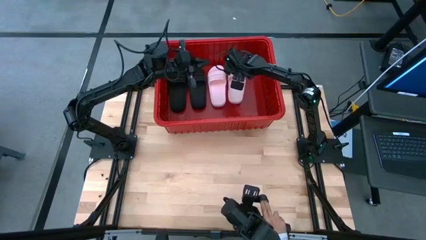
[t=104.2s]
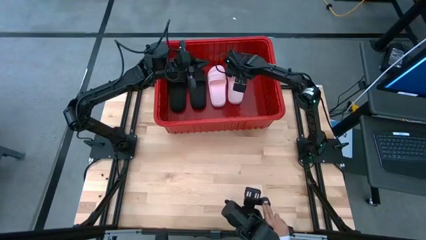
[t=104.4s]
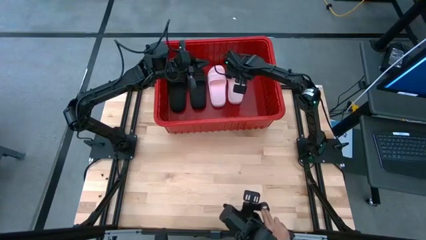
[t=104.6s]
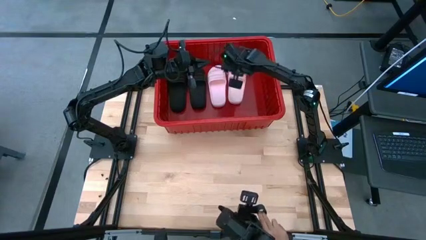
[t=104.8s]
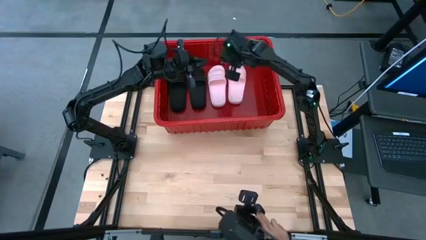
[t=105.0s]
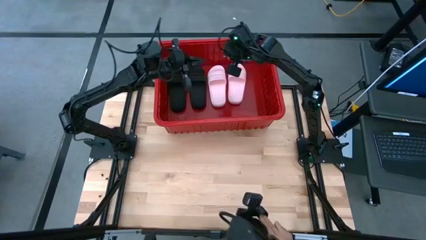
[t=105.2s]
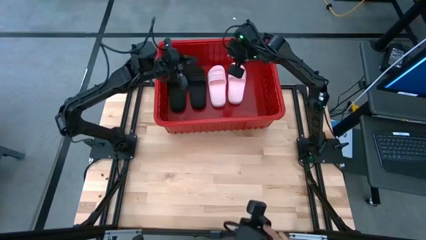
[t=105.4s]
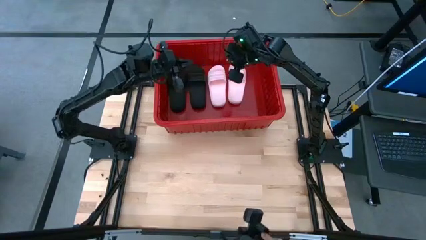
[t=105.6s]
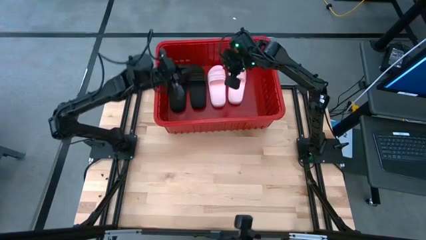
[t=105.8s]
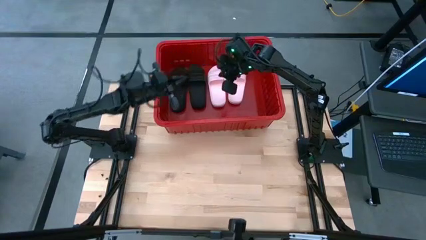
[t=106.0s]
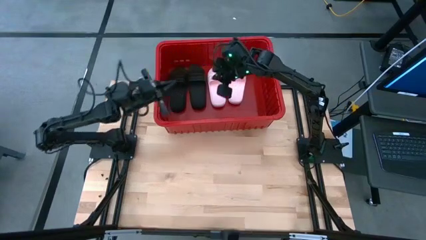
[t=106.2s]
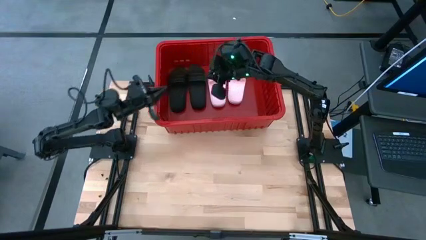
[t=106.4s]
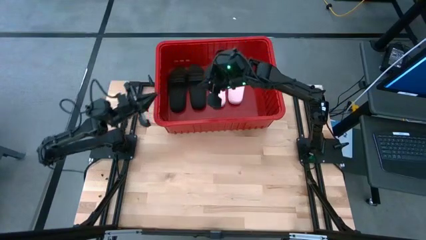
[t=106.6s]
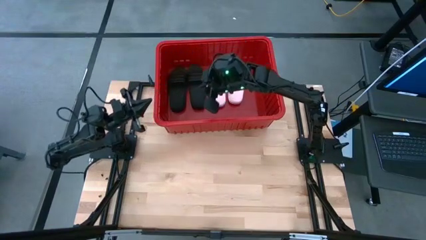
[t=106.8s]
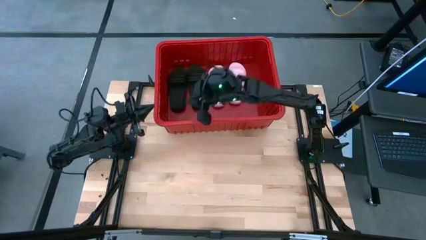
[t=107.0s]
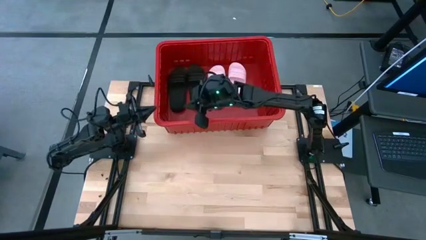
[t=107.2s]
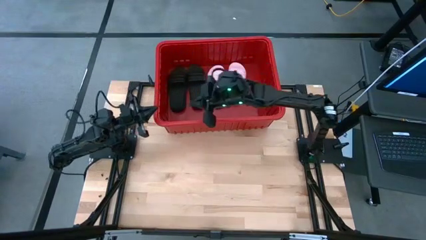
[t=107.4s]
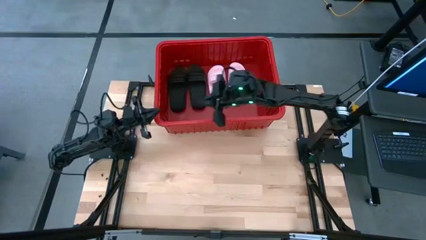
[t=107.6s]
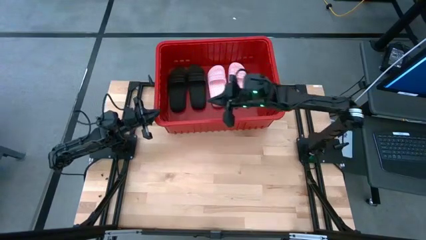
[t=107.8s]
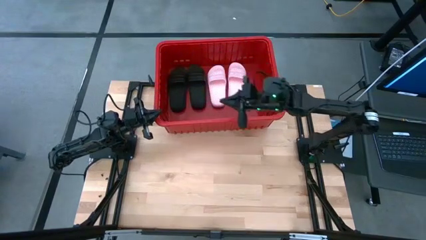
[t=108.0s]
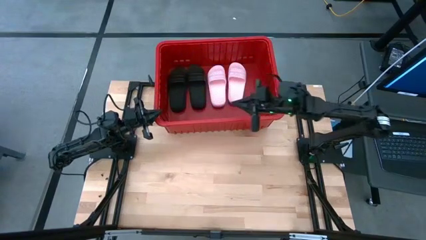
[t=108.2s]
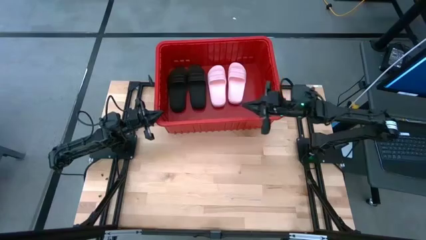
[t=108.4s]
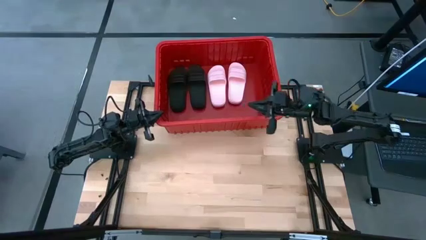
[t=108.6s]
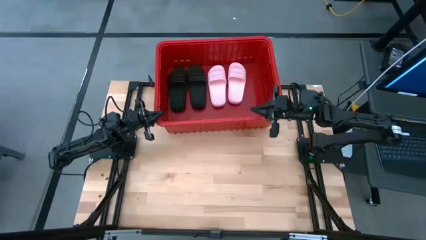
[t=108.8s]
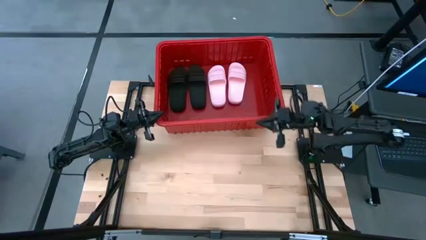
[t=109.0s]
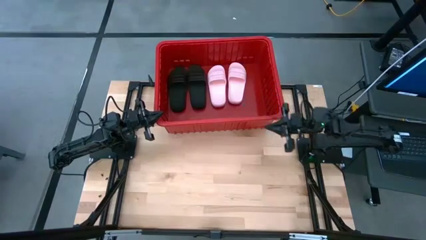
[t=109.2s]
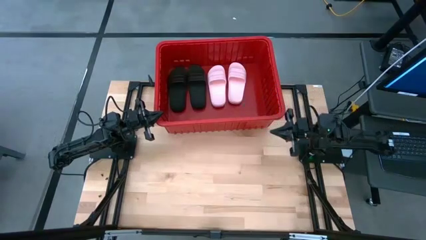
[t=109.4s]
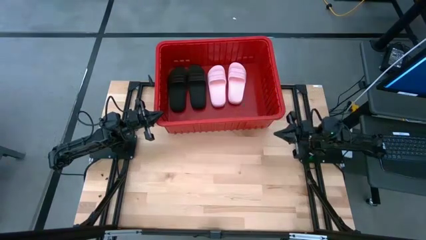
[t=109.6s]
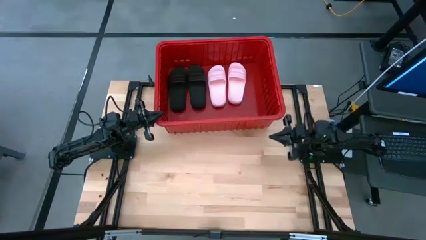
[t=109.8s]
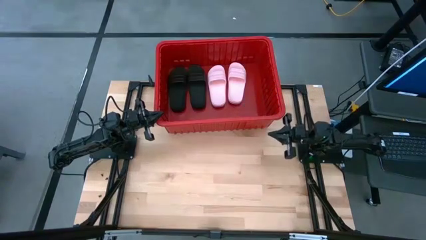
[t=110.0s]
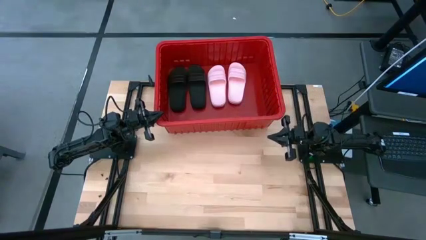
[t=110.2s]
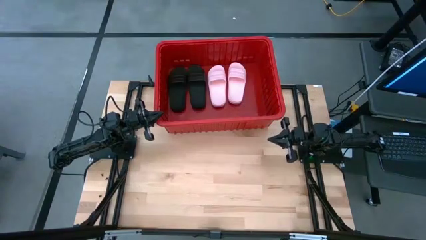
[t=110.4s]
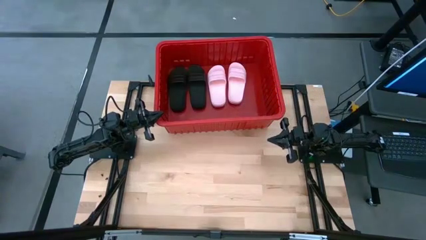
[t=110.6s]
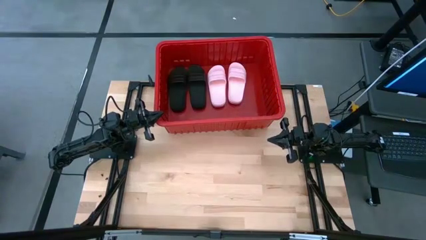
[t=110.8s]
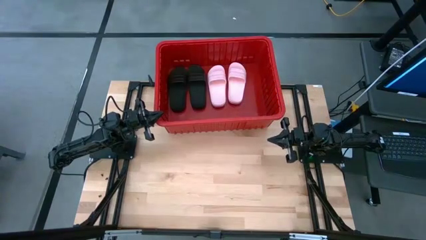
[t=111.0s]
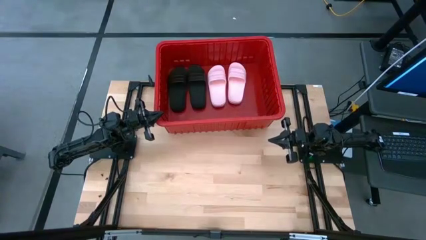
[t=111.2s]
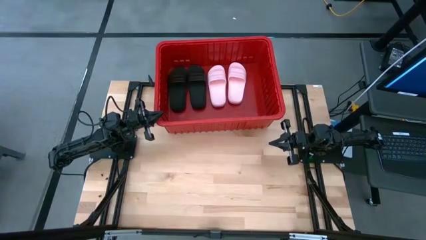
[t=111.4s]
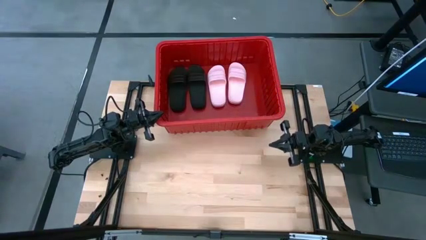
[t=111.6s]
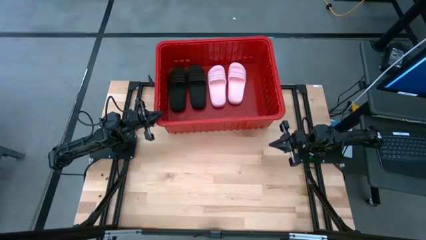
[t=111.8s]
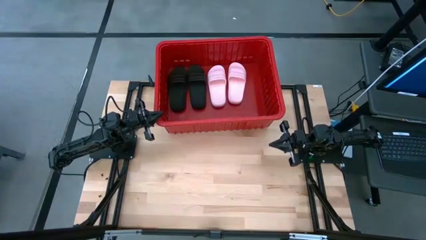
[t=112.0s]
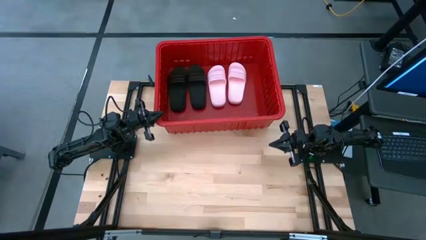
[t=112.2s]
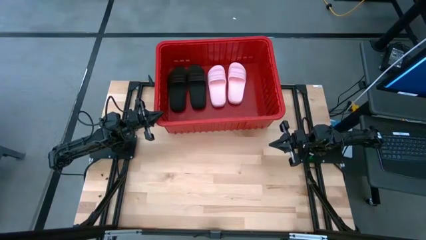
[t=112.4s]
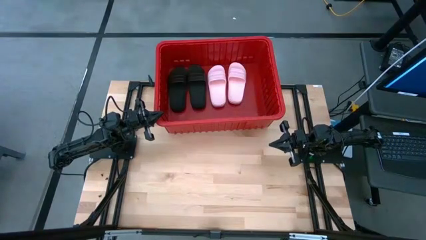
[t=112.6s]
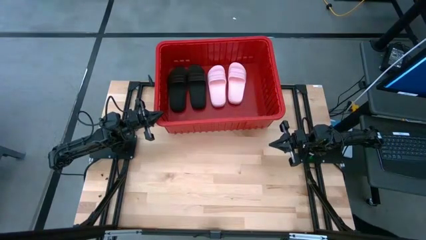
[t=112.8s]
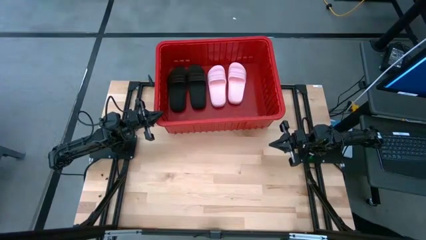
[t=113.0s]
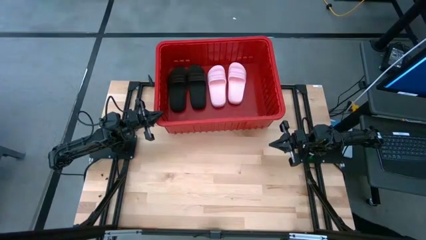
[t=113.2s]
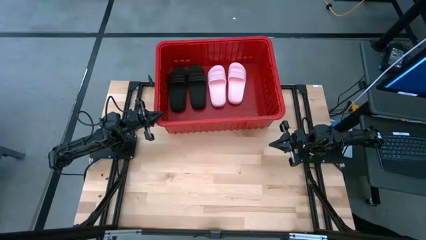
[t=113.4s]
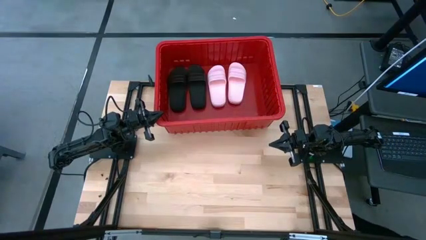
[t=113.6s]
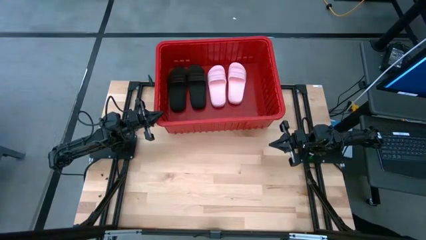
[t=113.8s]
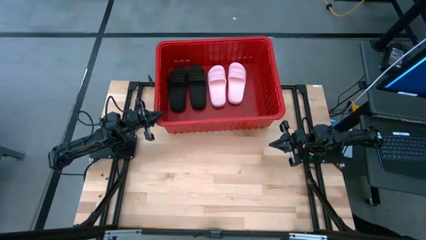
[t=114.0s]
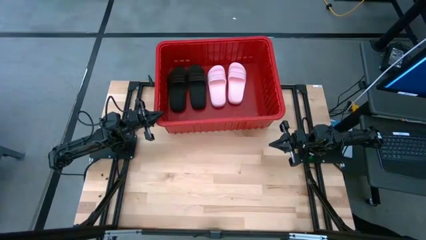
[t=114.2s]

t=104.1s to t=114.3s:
Task: Pick and place slides into bin
Return to Home Position

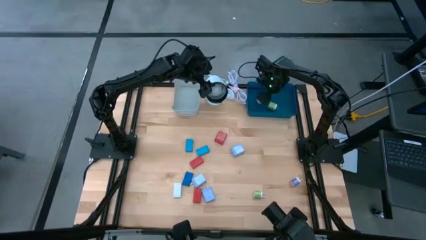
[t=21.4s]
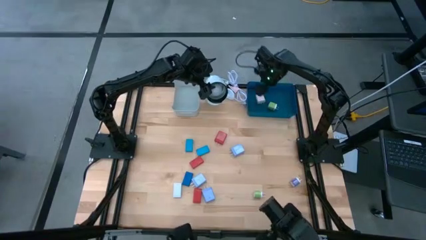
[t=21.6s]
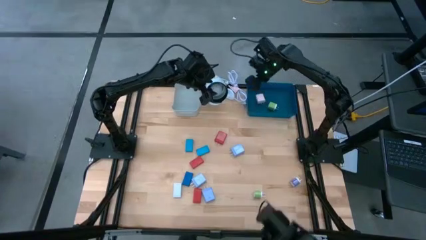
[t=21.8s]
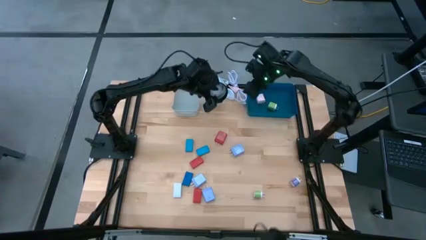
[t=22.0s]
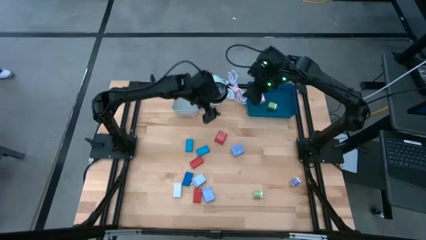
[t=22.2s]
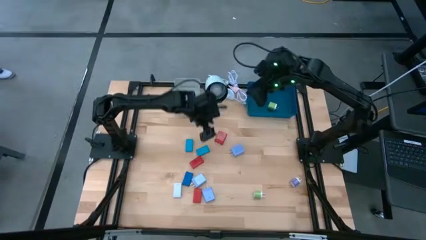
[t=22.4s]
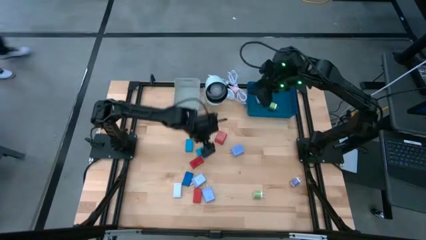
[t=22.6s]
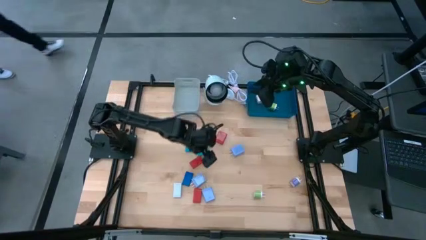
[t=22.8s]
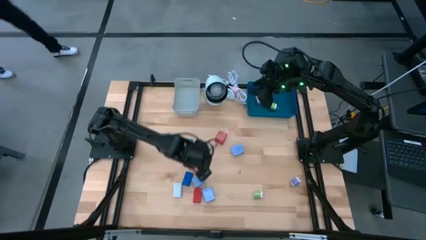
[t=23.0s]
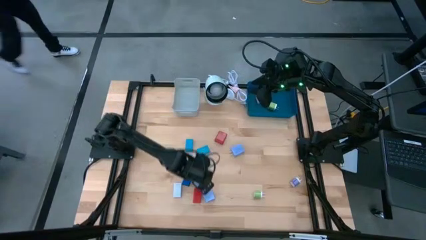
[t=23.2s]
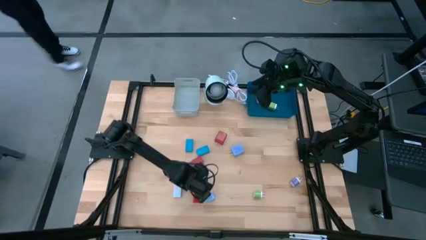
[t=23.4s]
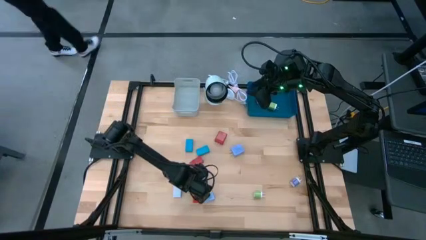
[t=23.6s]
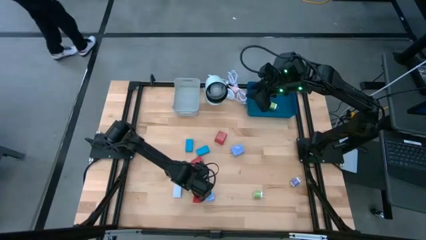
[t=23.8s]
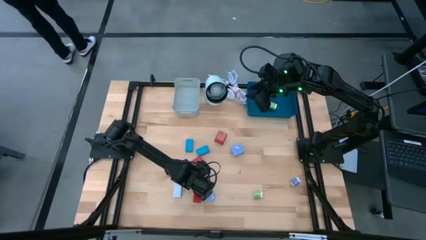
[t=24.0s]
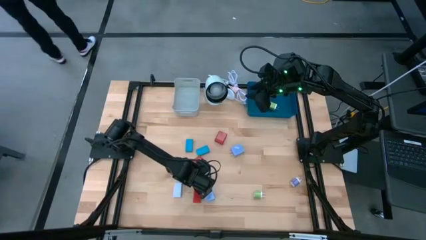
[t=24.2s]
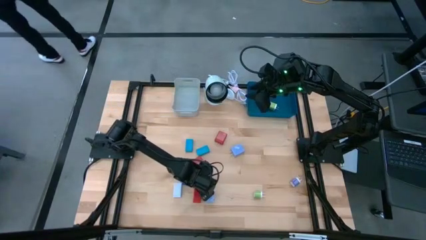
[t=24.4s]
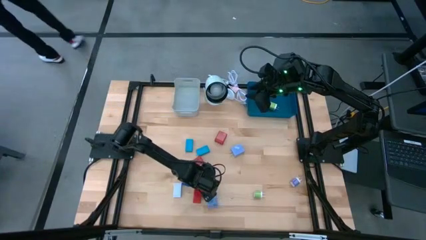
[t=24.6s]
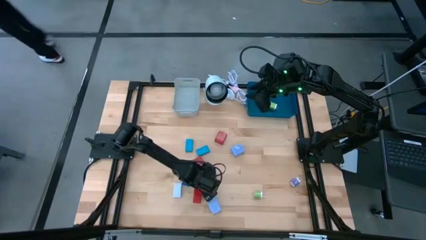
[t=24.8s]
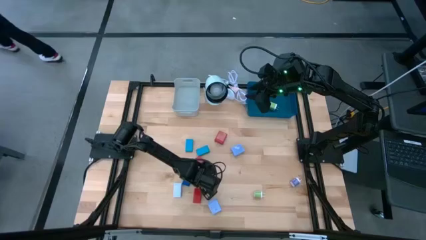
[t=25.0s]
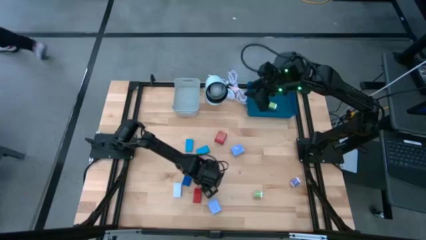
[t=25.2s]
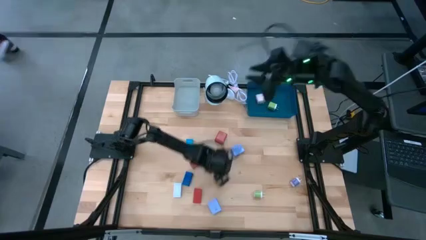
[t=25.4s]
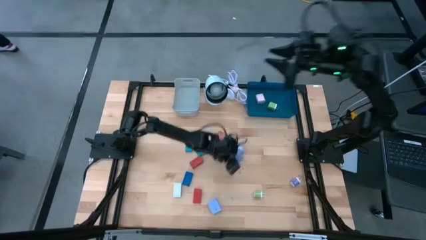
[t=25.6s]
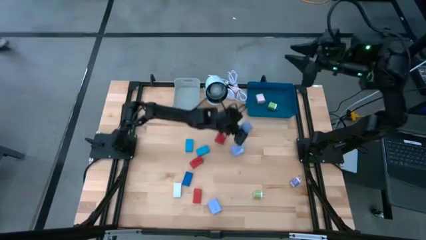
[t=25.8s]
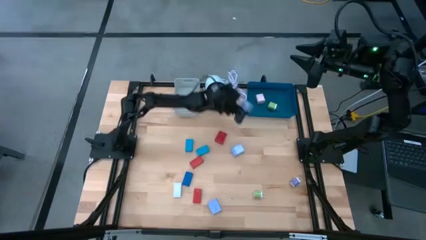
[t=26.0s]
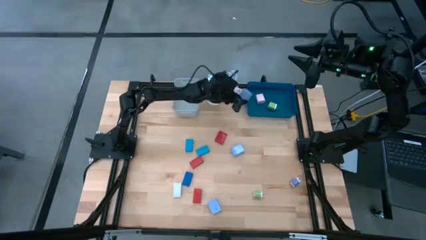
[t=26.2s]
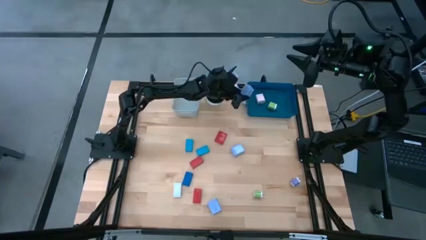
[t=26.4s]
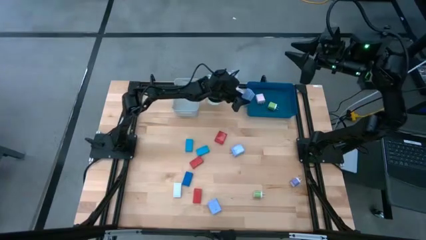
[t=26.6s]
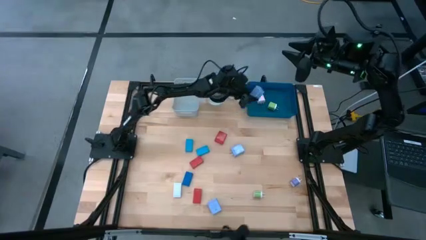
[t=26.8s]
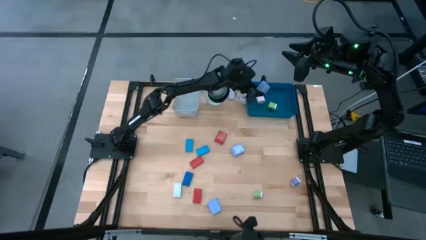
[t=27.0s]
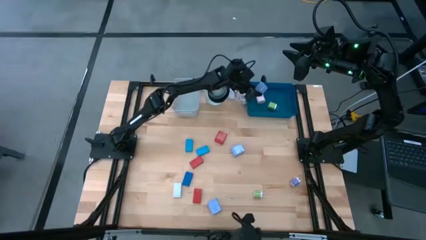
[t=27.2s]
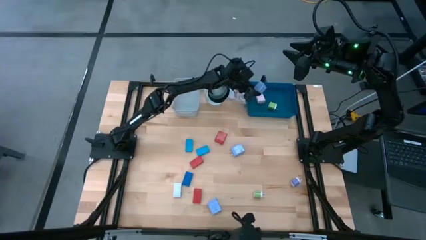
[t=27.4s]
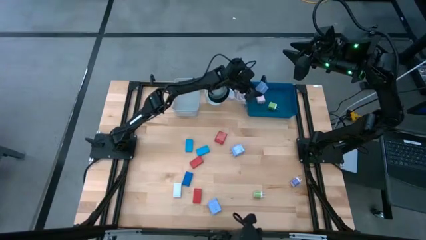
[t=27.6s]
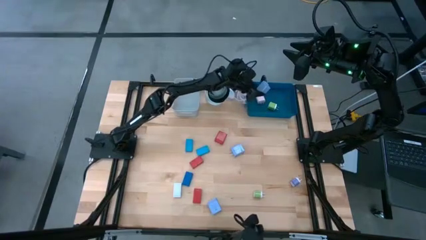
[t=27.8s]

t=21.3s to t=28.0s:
Task: Pick & Place Office items
Put the middle light purple charger adapter into the blue bin
